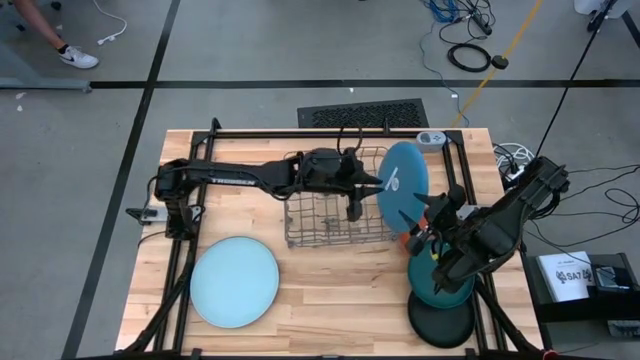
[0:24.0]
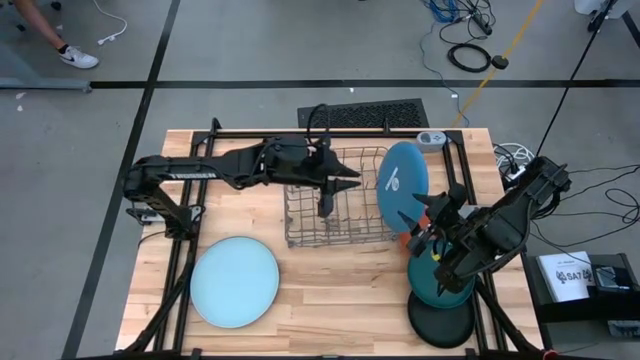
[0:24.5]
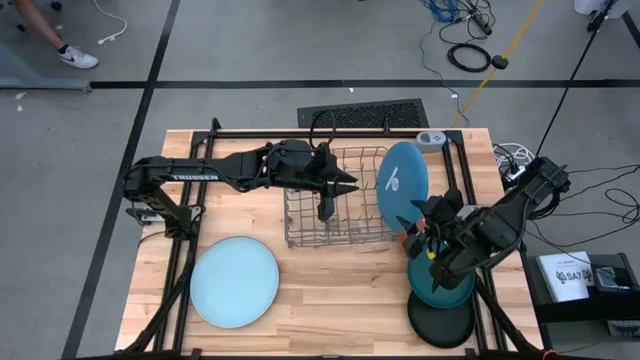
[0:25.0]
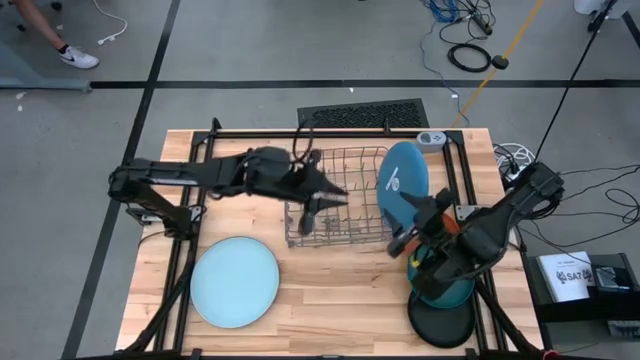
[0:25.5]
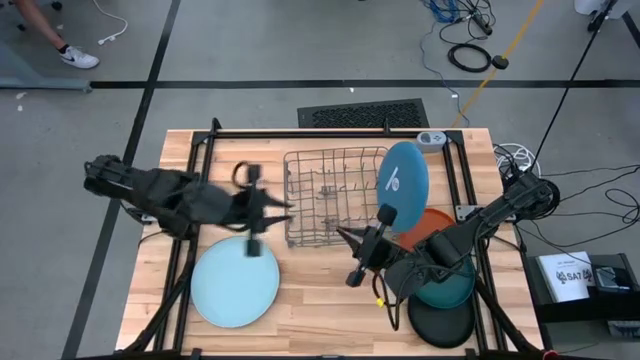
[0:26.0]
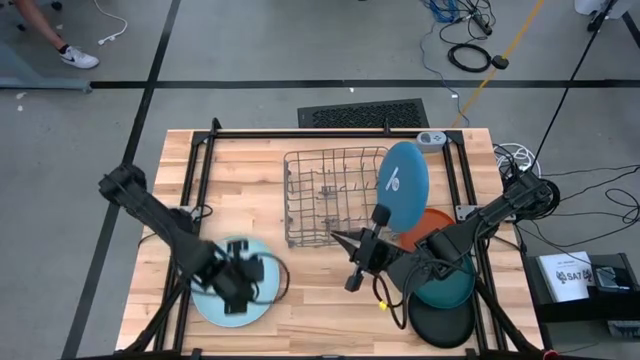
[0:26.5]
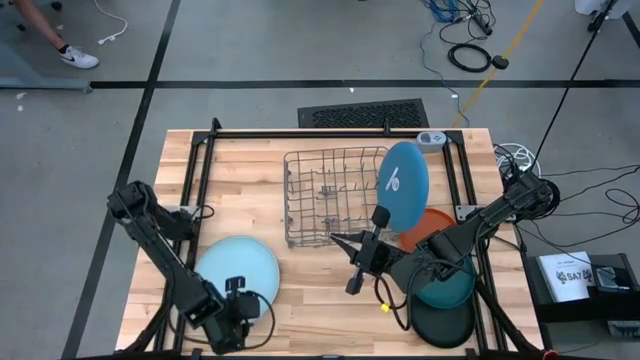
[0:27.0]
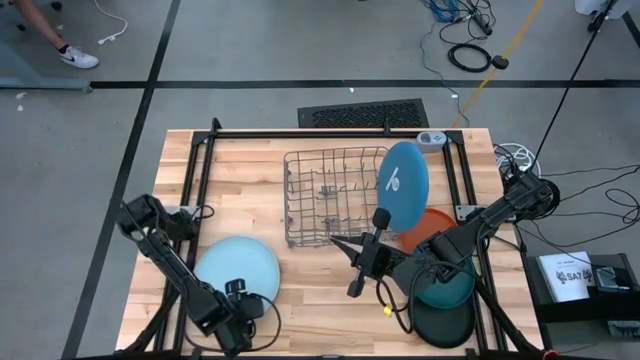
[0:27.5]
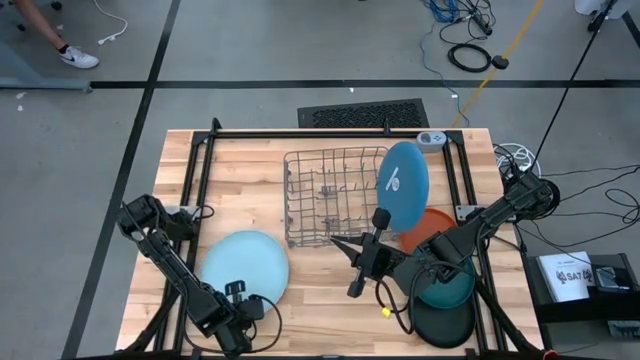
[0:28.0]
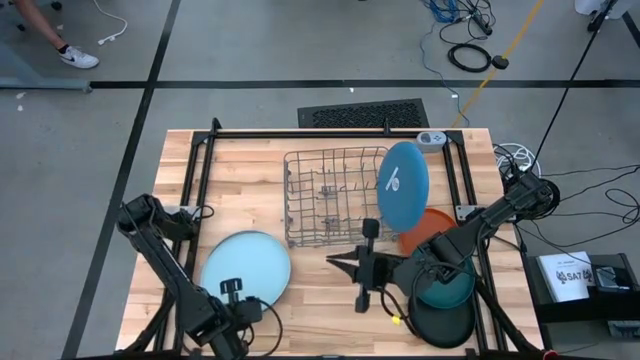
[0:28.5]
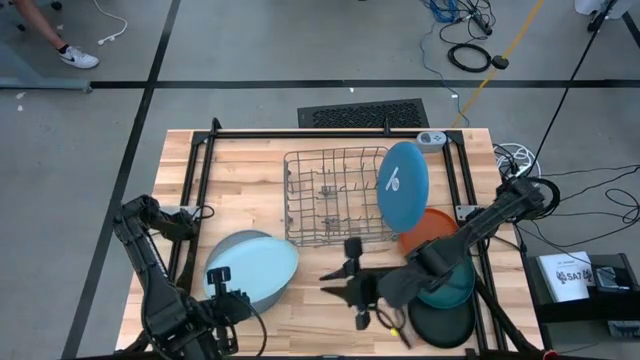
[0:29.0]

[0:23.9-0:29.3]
Task: Sort dishes
Put the light blue plate into the dish rack

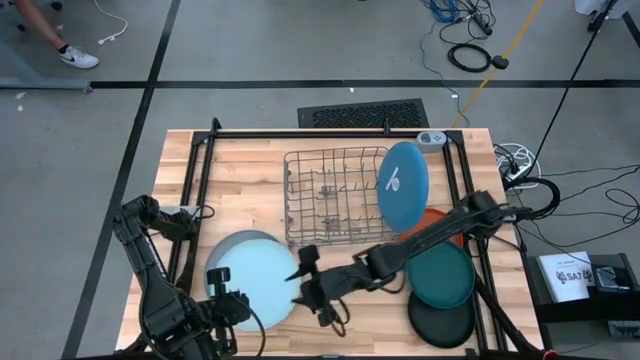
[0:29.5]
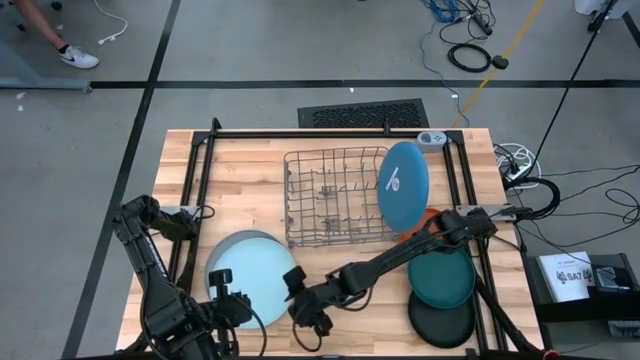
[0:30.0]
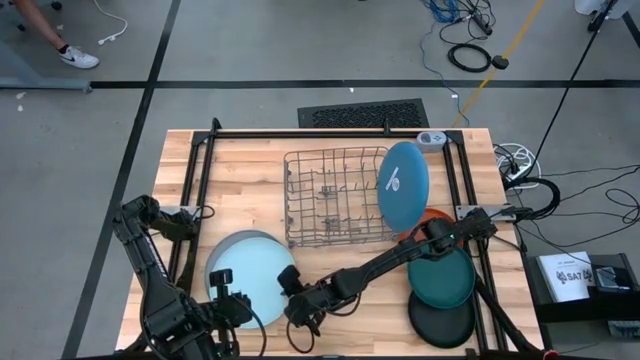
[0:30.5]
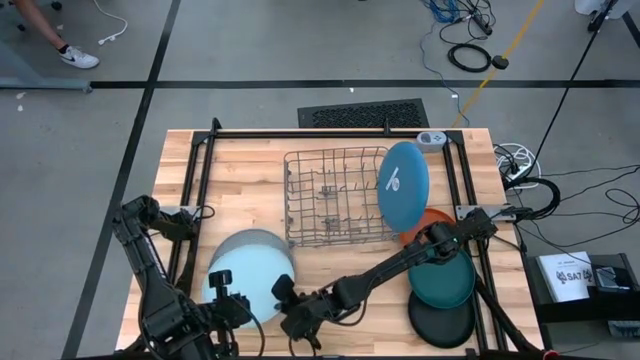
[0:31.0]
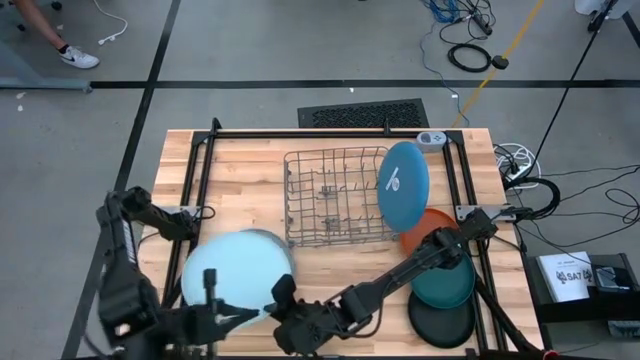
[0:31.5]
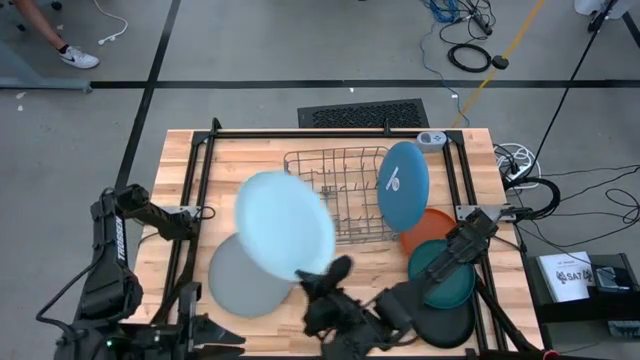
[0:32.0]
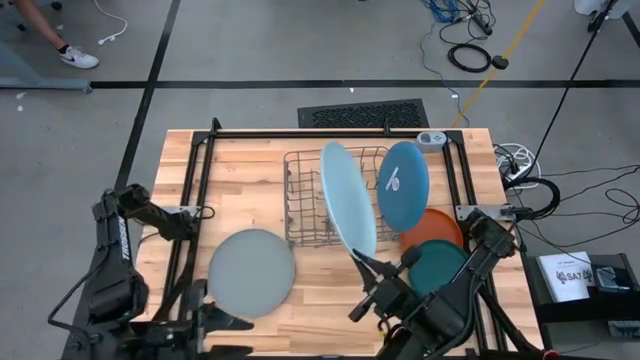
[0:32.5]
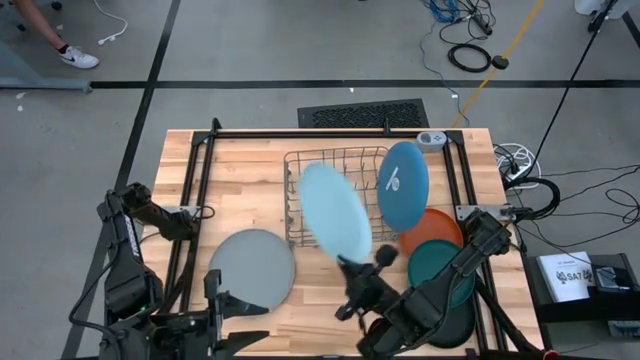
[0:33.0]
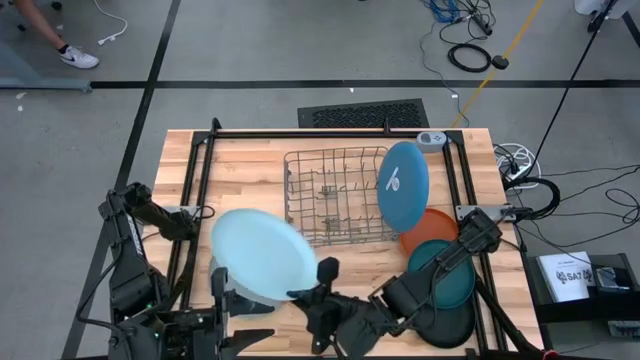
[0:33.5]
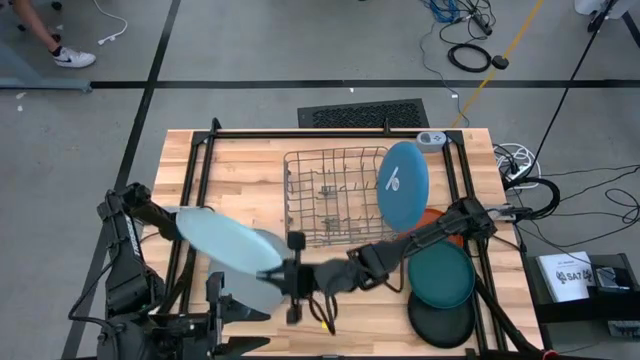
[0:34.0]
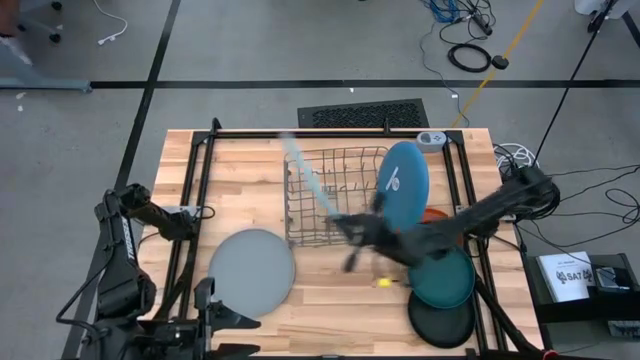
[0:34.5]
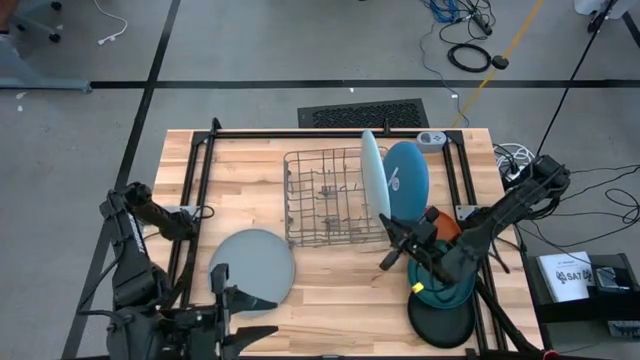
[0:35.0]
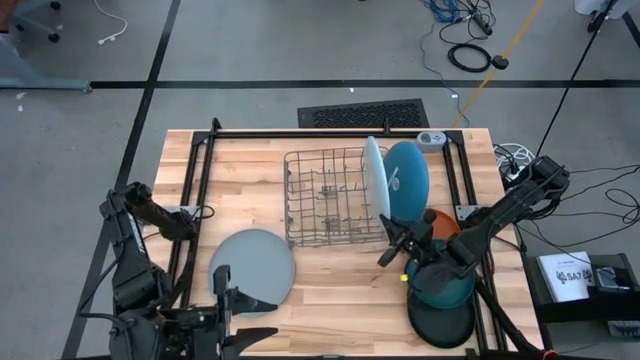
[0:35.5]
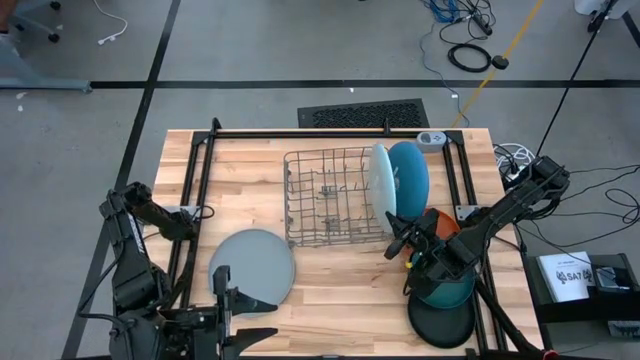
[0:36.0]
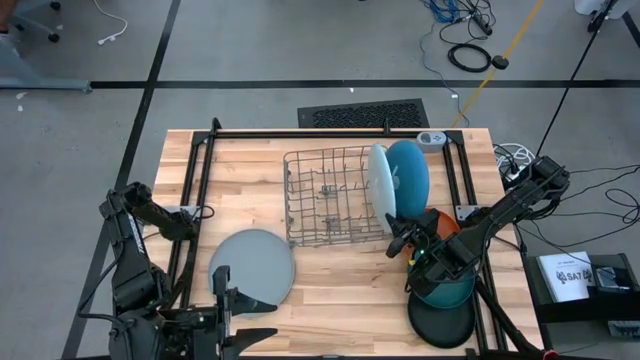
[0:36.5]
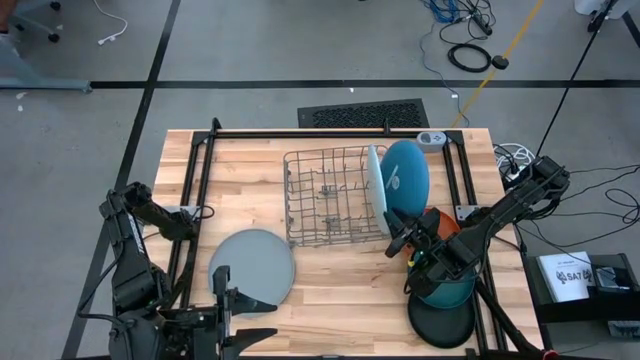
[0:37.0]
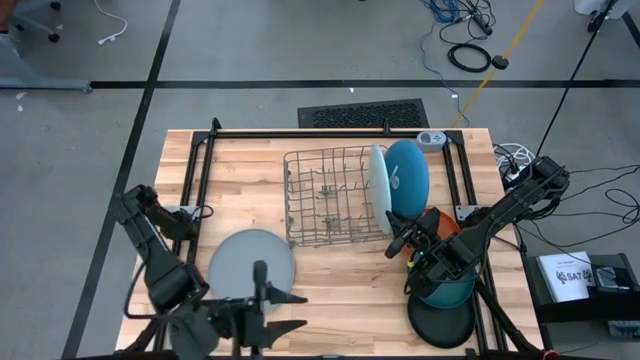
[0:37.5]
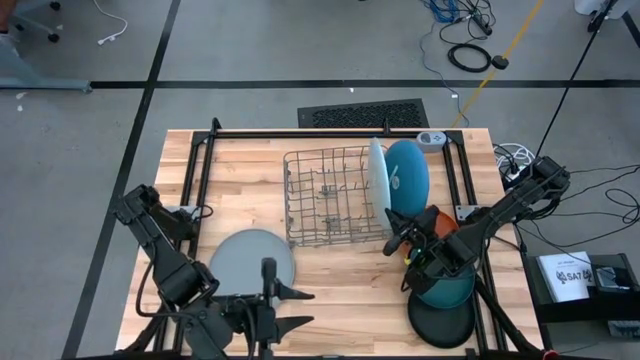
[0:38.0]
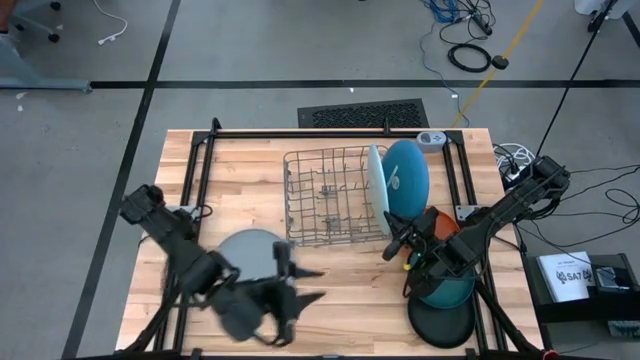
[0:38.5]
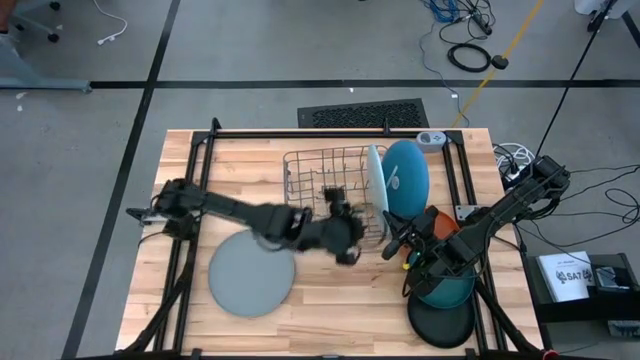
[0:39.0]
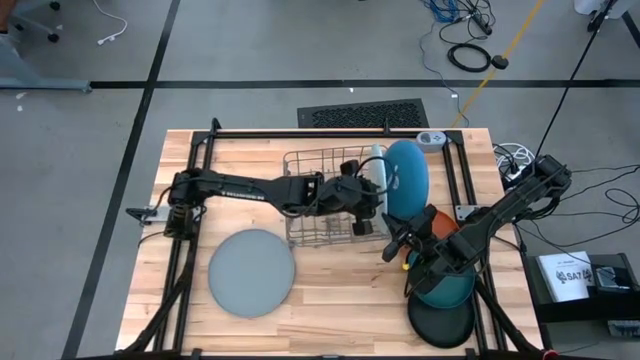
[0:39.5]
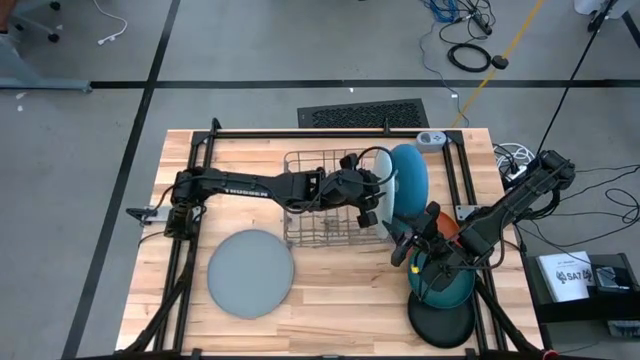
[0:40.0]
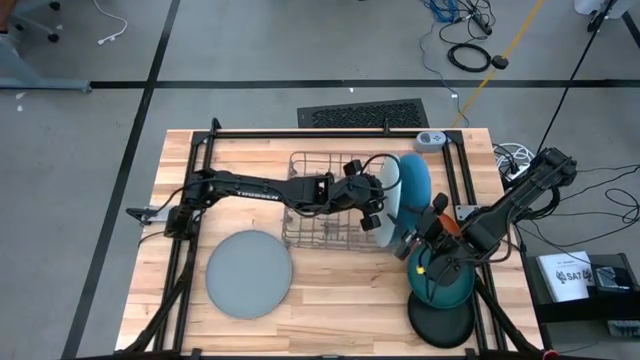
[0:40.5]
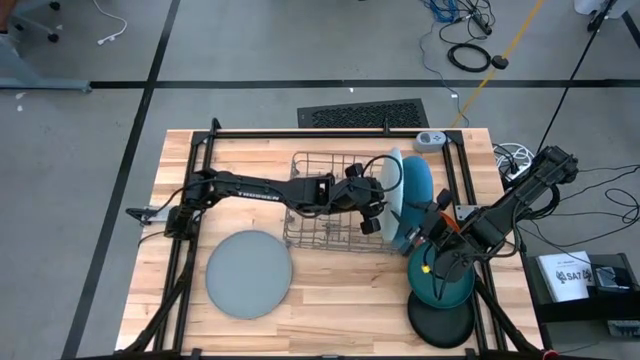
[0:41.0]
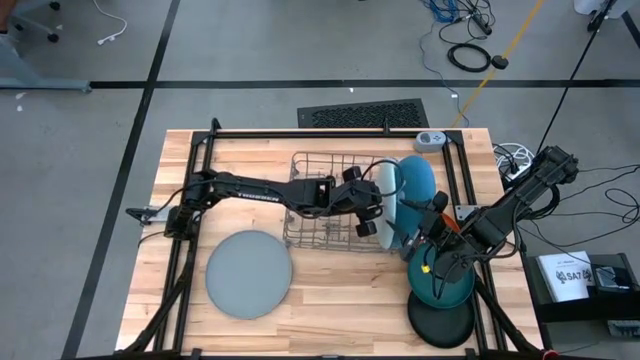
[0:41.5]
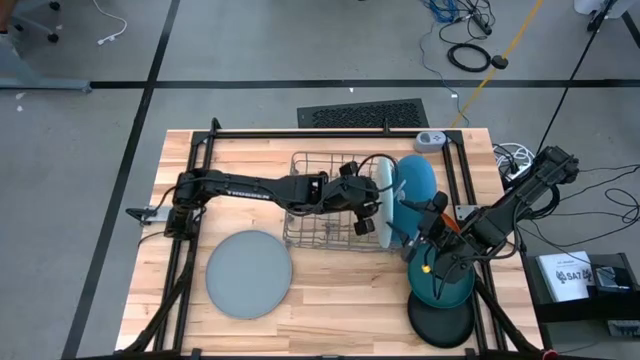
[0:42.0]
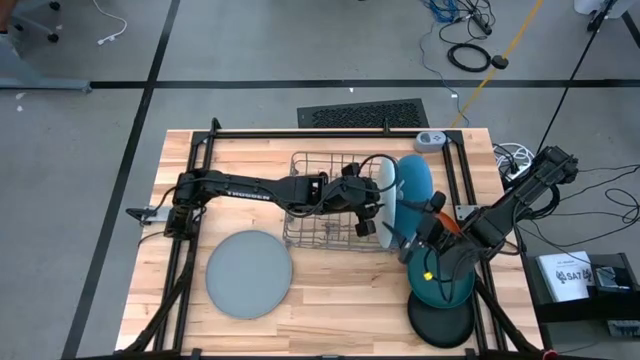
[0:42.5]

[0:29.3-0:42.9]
Put the light blue plate into the dish rack

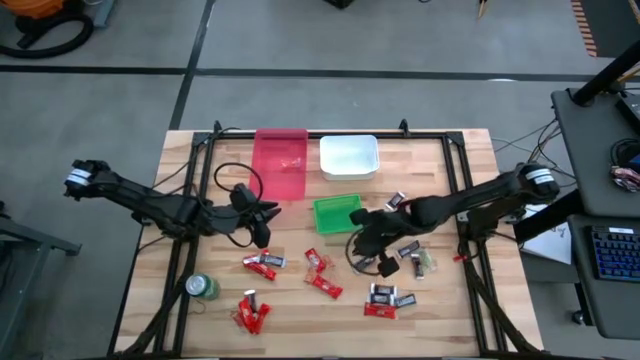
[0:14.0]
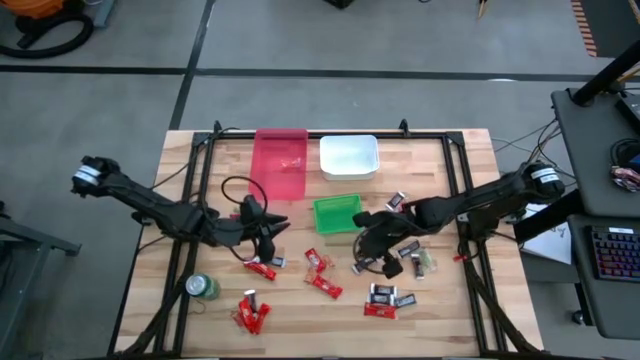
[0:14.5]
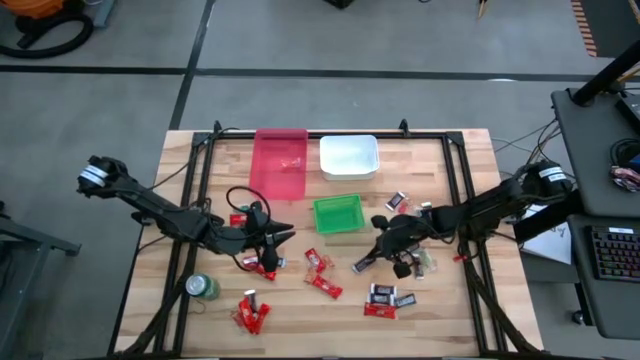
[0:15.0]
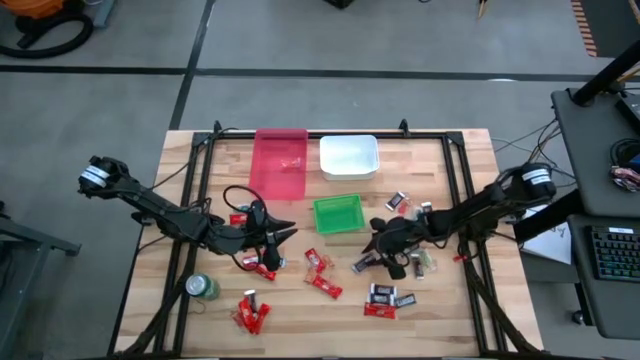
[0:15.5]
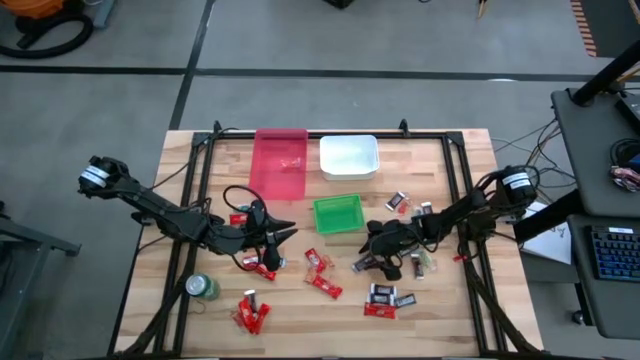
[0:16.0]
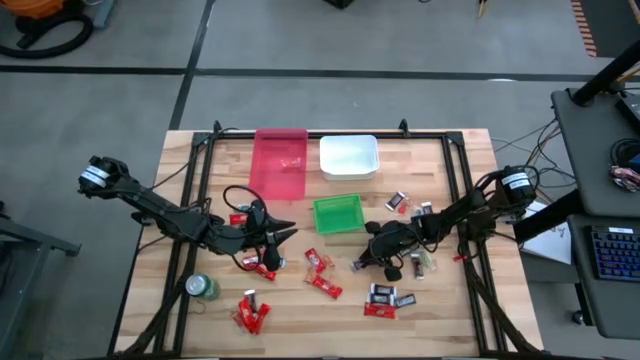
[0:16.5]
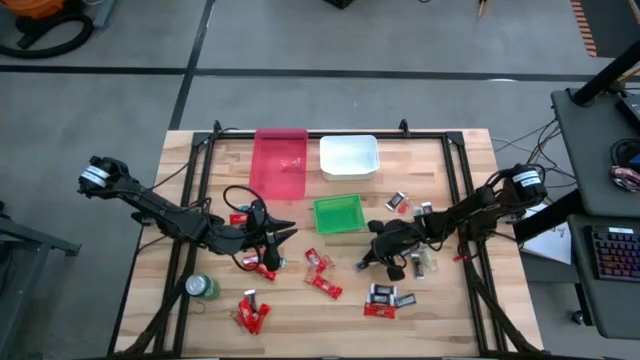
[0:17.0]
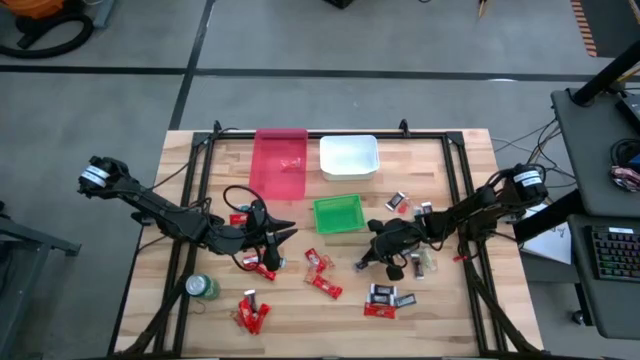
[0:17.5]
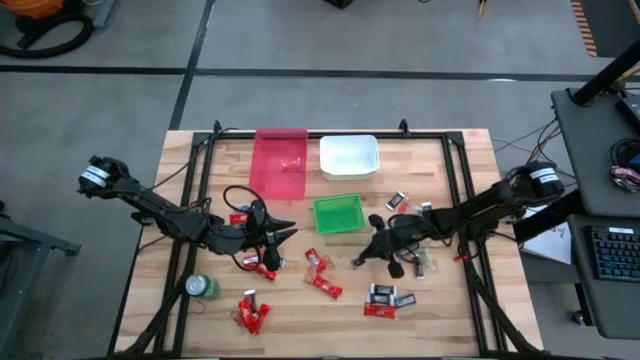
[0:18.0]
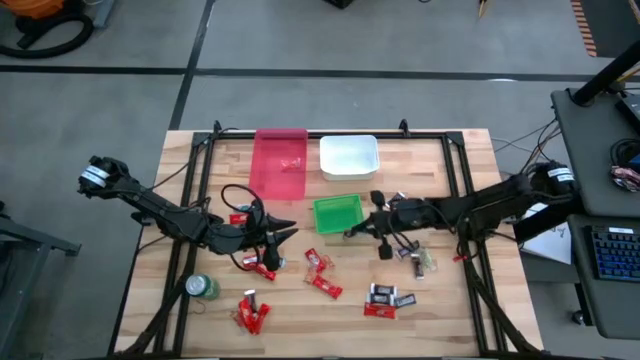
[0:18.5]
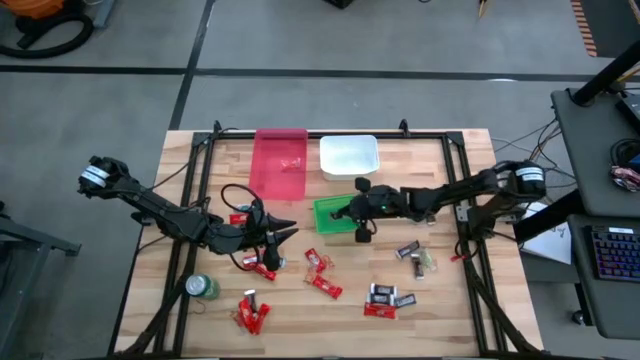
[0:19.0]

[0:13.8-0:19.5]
Task: Sort candy
Put the brown chocolate bar into the green bin
